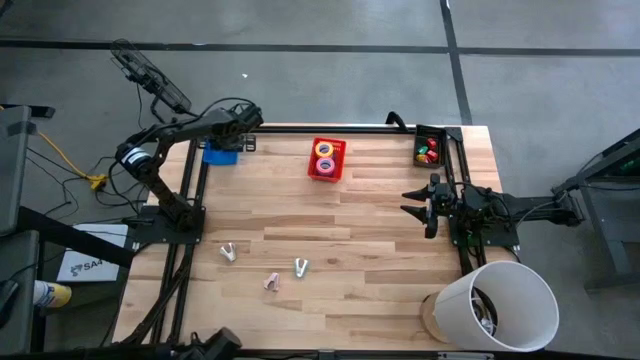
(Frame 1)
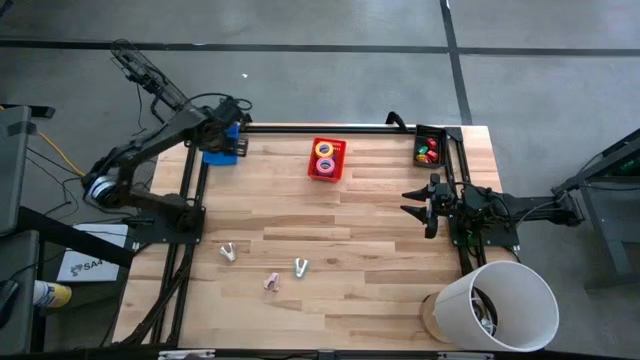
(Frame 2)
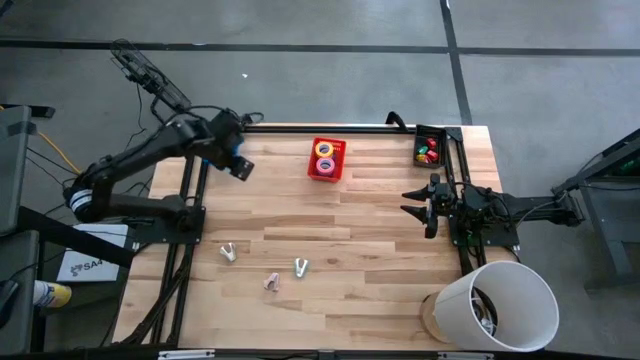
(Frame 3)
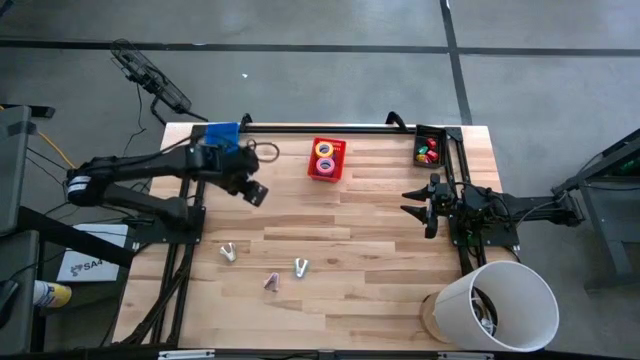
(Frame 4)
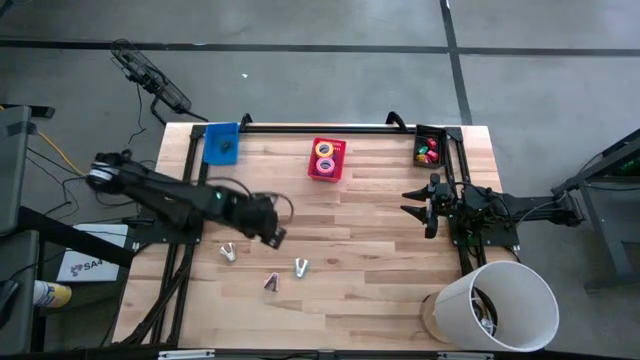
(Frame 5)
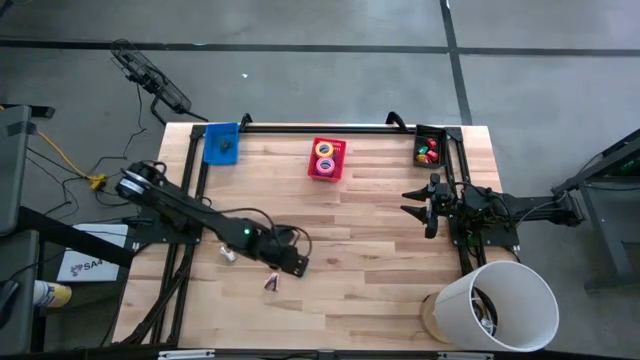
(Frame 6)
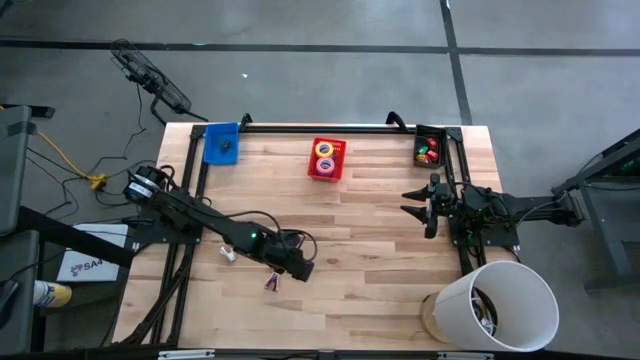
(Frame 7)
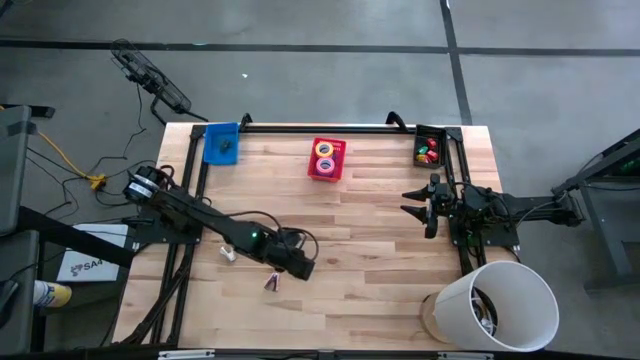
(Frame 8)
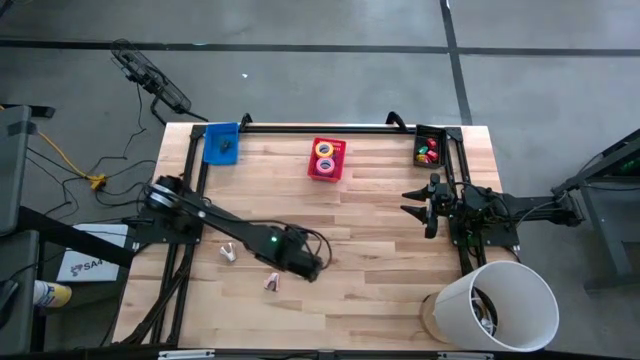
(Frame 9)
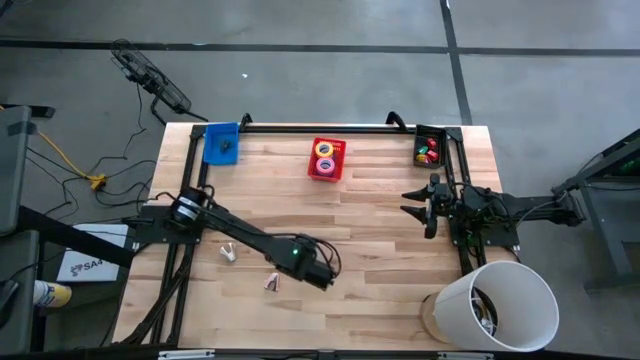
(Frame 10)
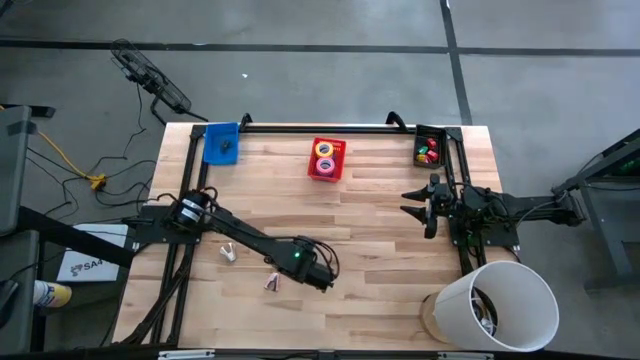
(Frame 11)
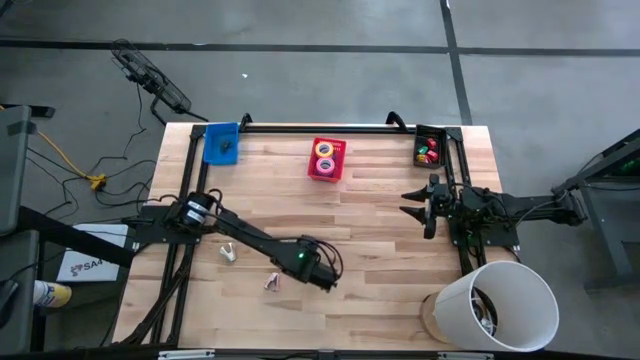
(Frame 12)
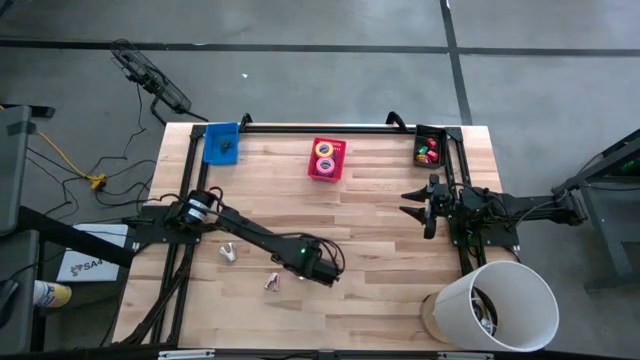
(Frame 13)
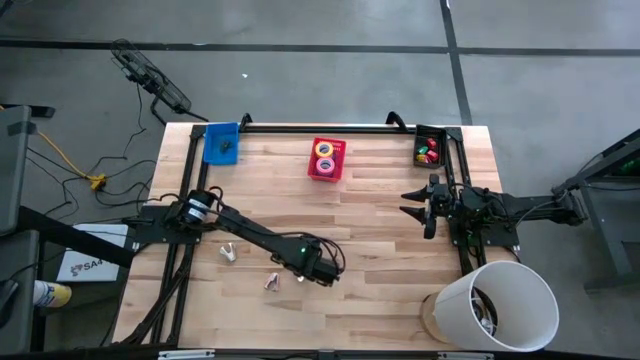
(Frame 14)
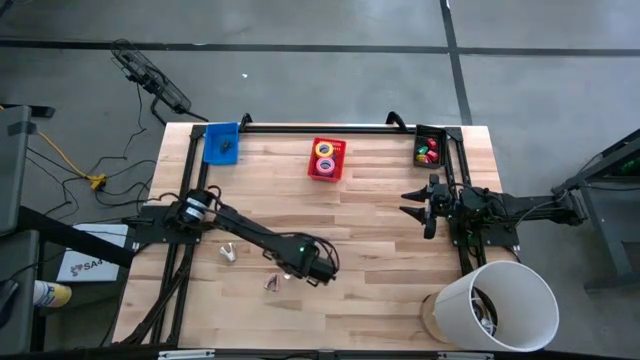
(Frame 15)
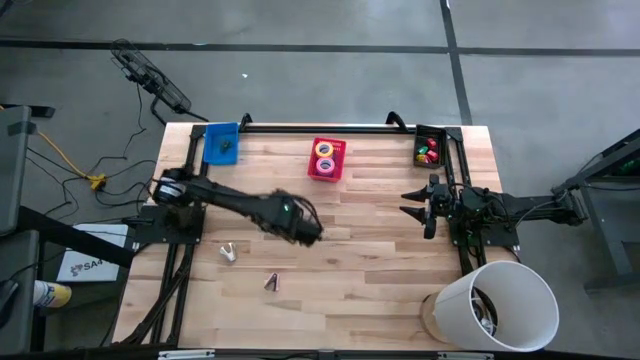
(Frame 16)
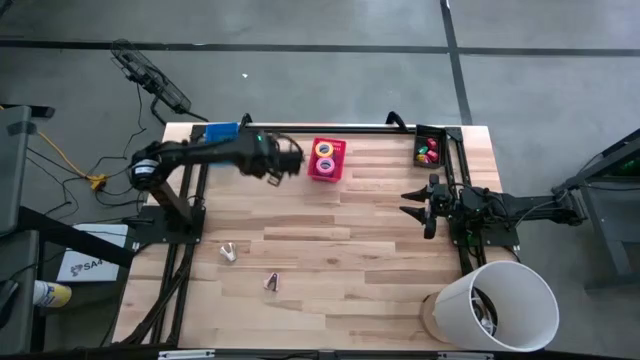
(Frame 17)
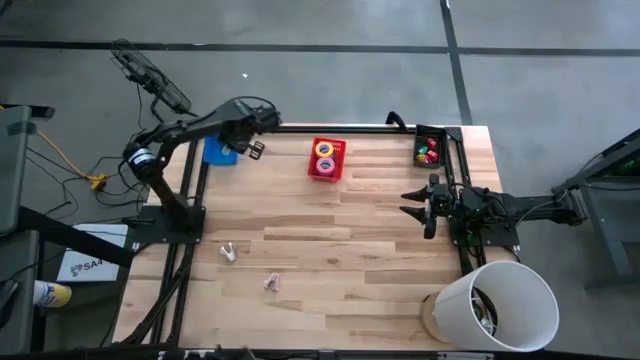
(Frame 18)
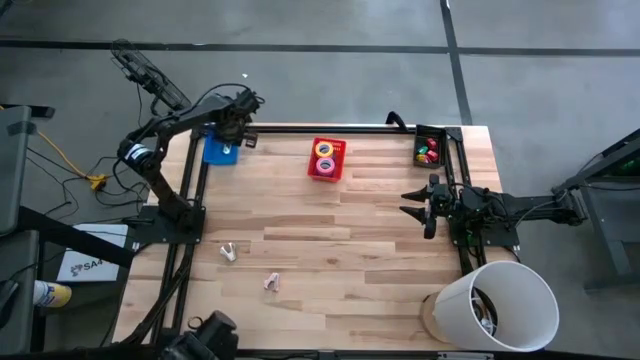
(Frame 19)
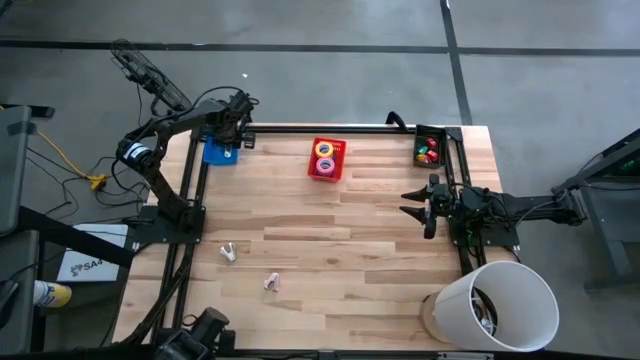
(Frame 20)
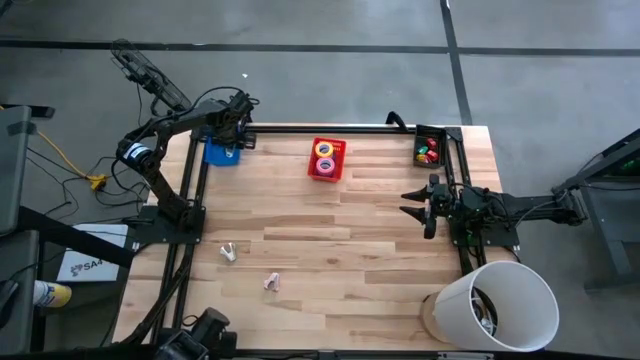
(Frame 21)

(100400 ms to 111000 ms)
Task: Pick and place Stapler, Stapler remover, tape
Put the blue staple remover into the blue bin

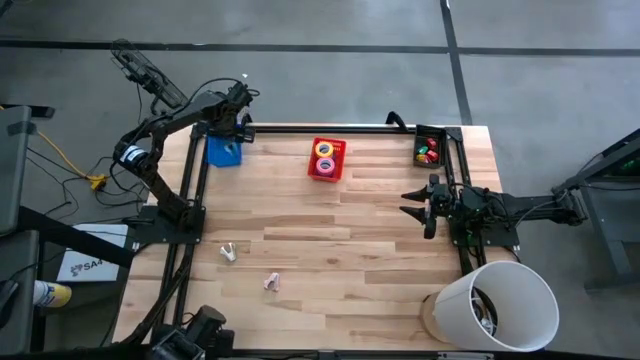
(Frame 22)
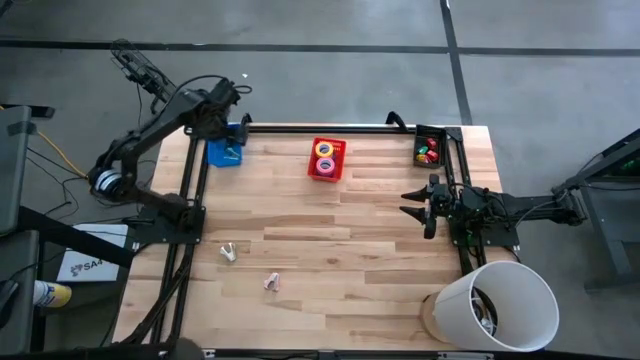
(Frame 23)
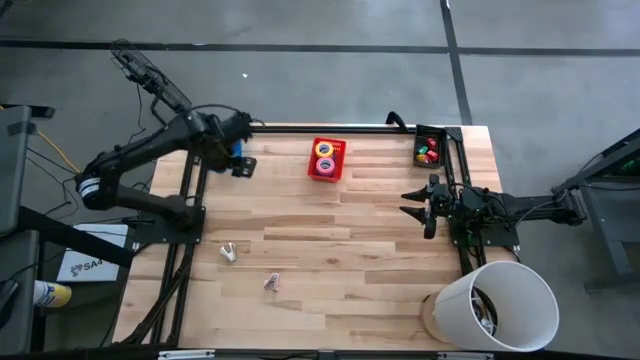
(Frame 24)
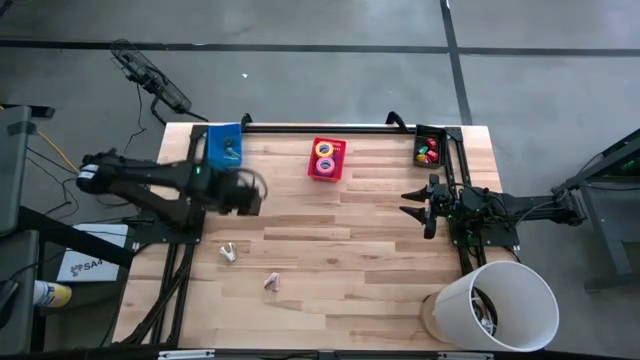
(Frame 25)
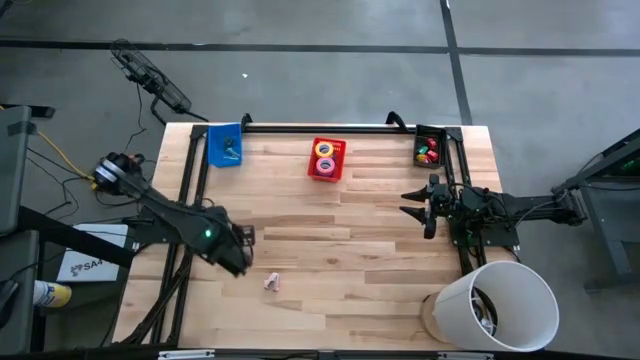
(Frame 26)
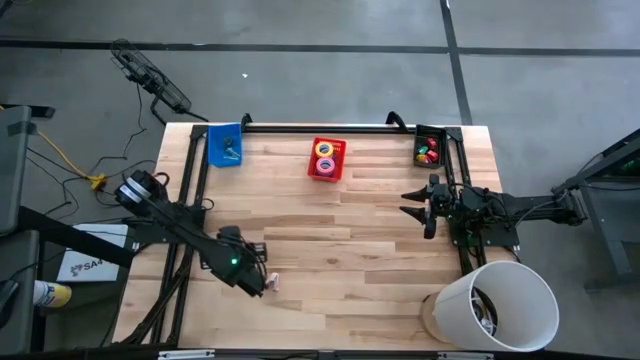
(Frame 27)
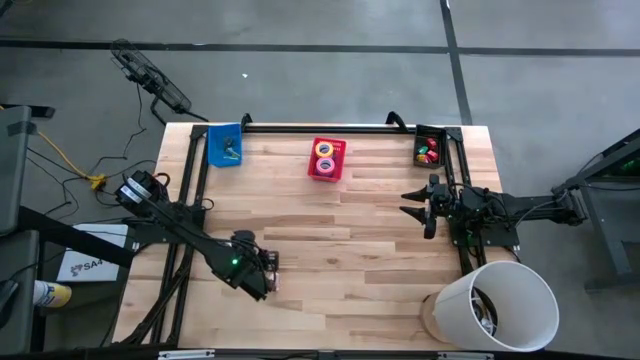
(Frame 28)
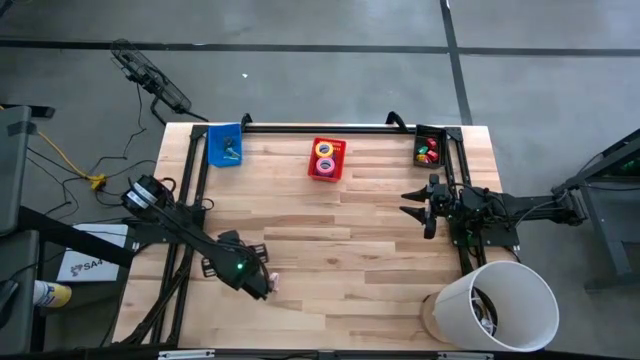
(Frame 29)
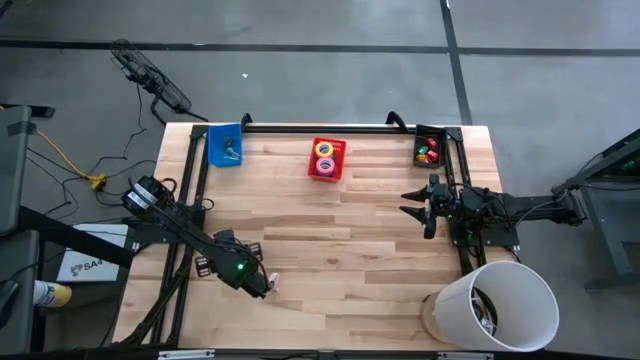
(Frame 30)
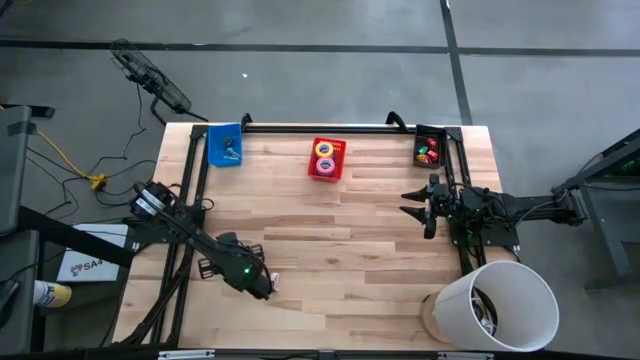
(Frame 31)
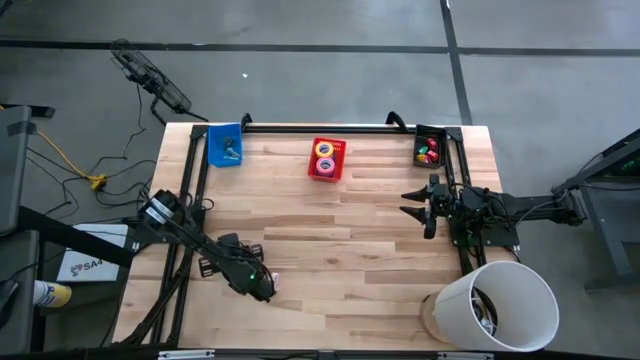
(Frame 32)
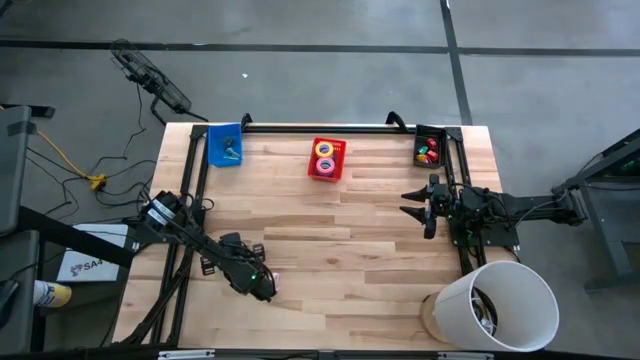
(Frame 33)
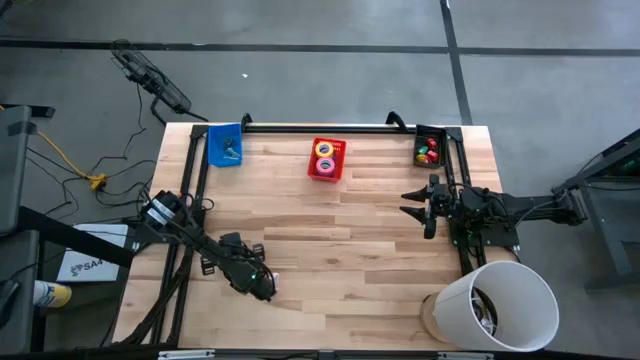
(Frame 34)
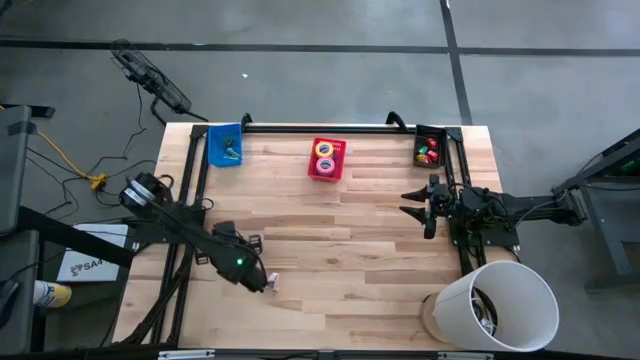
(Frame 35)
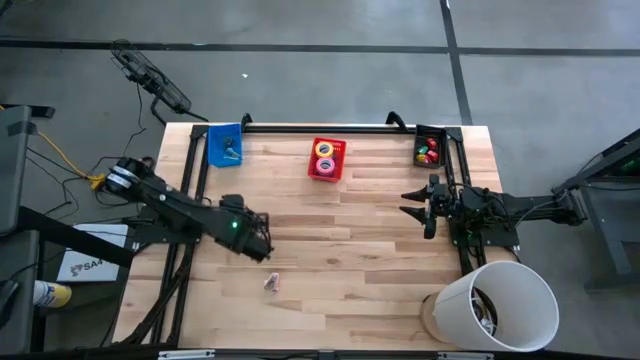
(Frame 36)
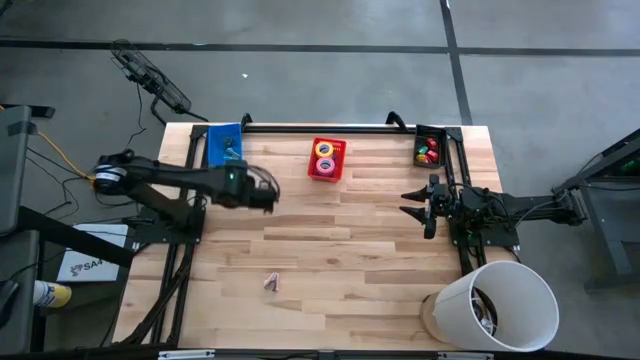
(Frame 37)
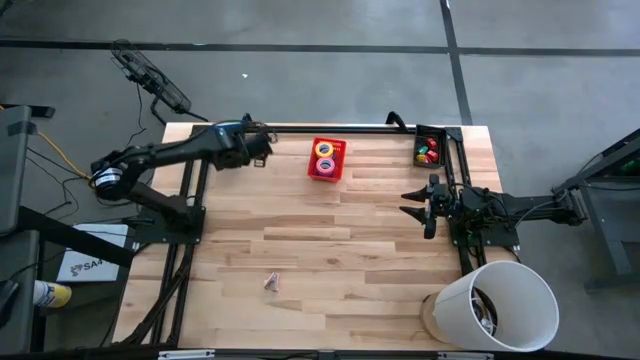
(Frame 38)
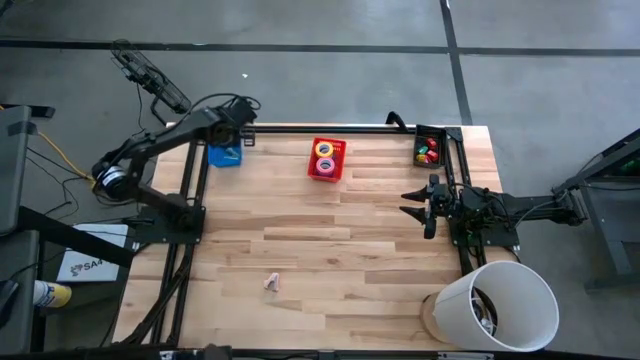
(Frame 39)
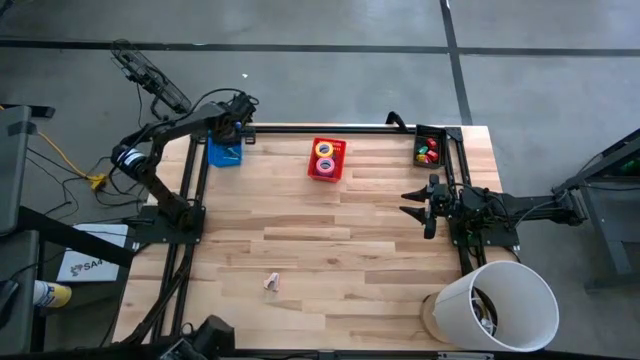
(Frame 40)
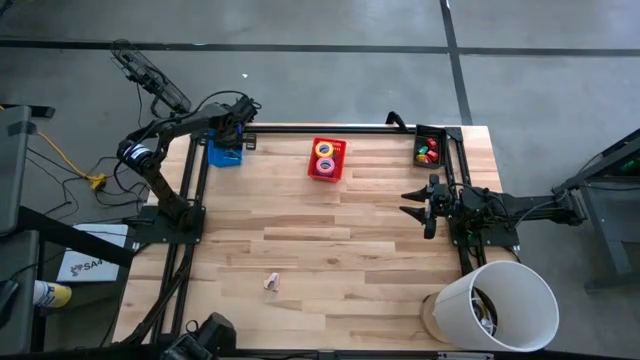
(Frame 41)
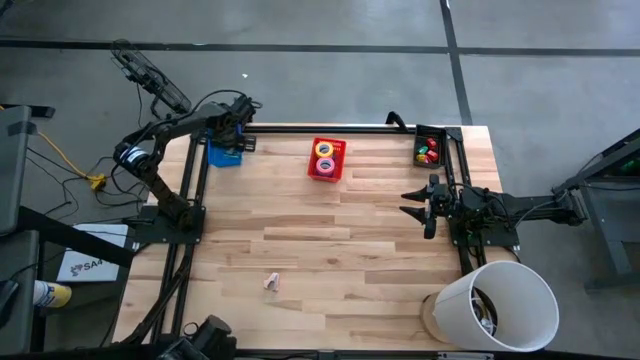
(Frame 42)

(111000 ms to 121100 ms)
Put the gray staple remover into the blue bin
